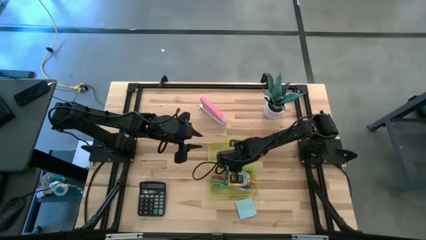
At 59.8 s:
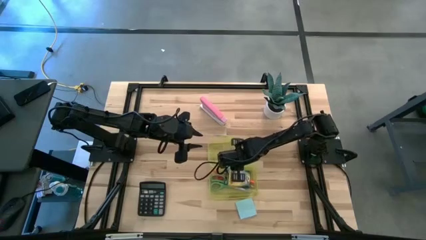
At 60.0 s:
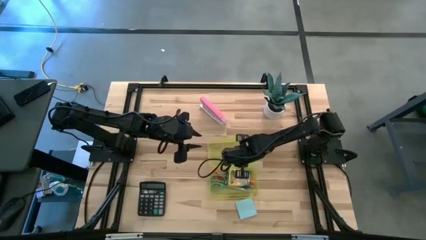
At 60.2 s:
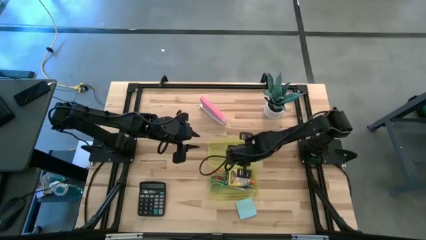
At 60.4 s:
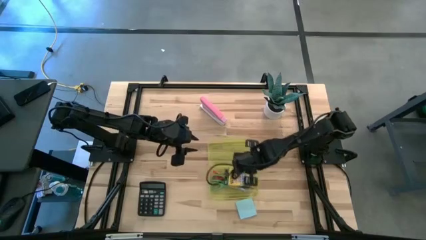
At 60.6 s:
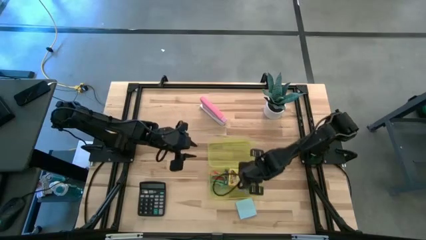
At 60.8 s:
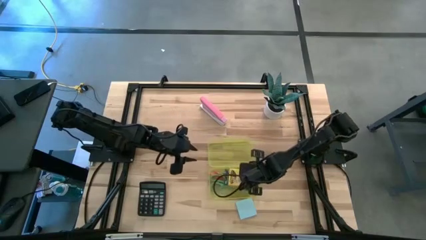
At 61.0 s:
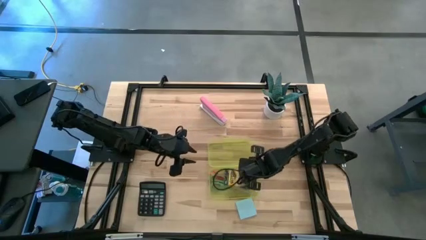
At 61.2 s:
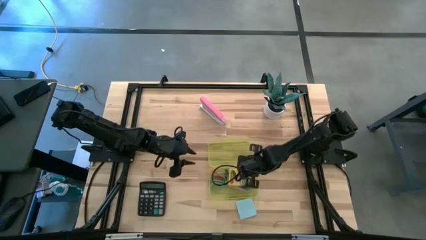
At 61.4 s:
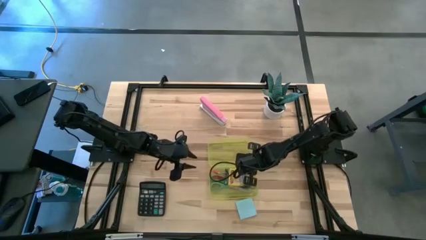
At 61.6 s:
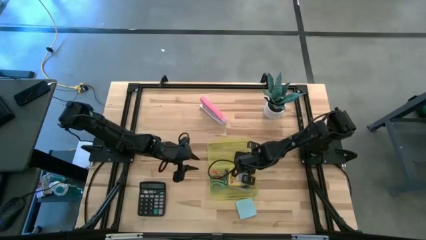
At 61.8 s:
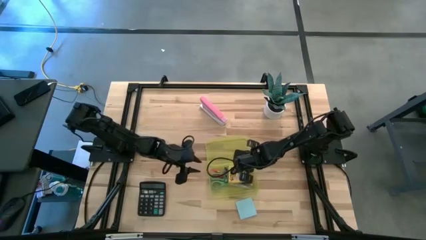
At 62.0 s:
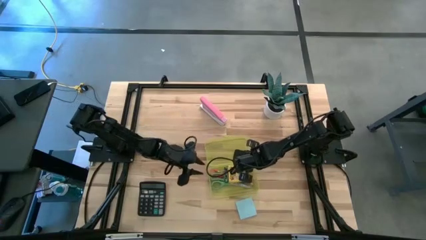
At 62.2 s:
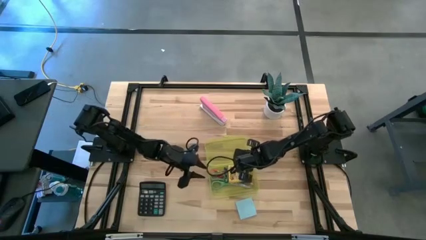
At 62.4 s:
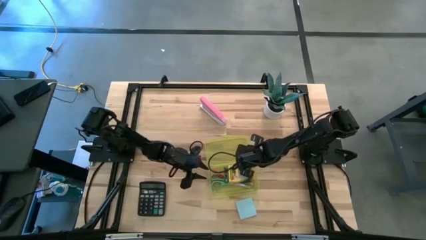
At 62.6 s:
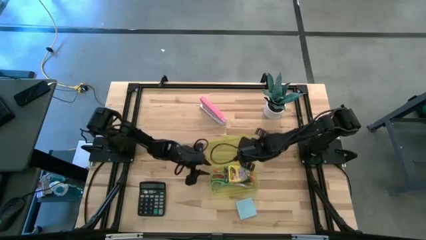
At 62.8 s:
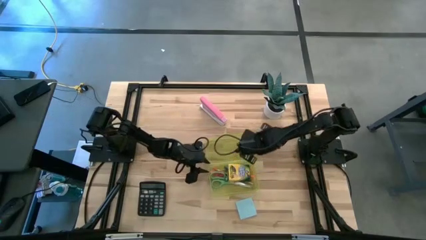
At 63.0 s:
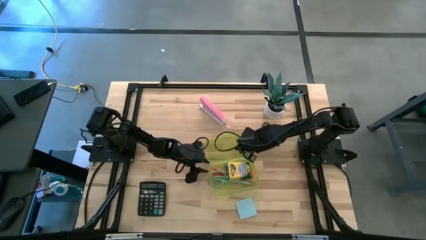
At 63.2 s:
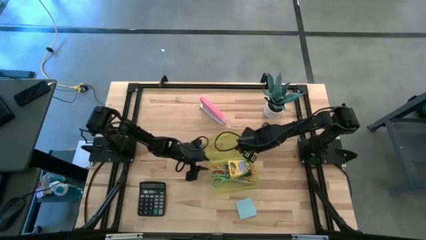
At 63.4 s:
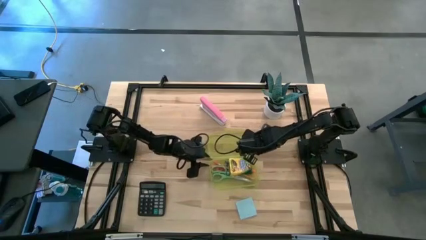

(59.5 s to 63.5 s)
Task: Pack school essentials
Adjust the yellow supply box

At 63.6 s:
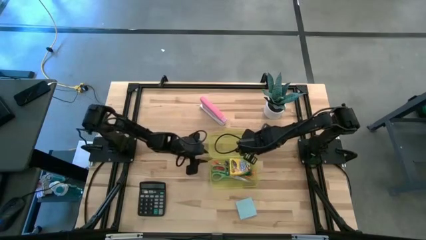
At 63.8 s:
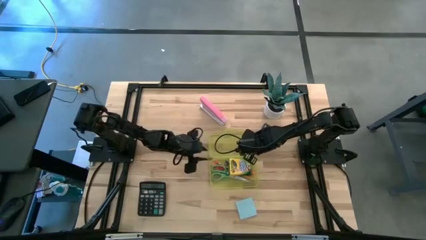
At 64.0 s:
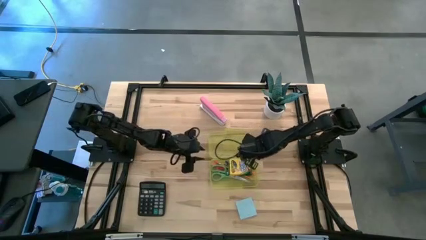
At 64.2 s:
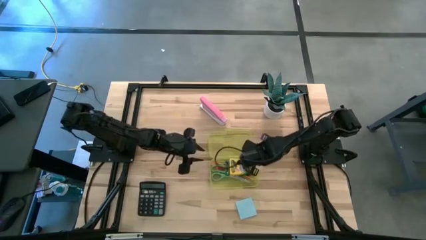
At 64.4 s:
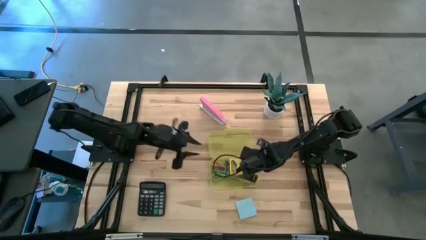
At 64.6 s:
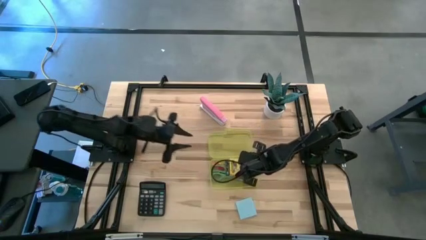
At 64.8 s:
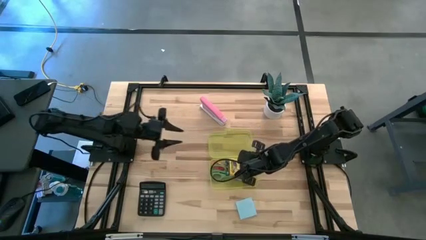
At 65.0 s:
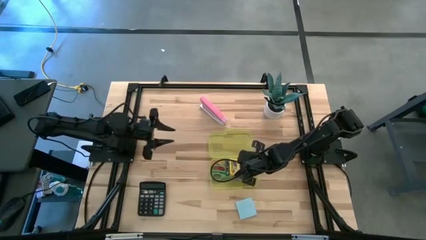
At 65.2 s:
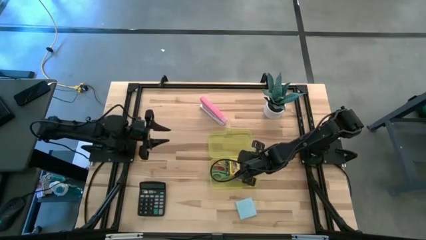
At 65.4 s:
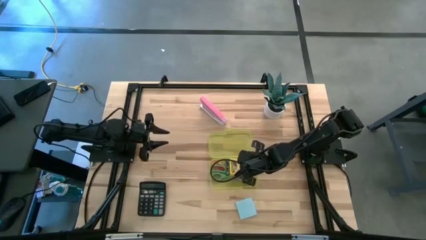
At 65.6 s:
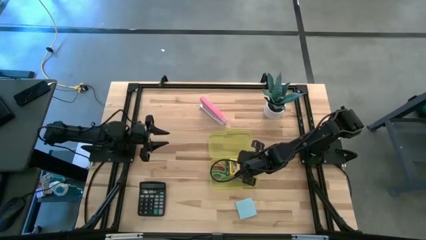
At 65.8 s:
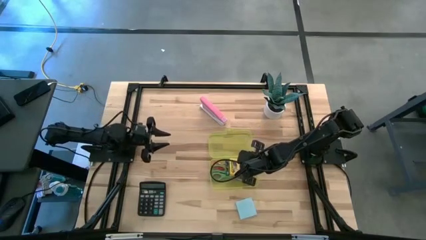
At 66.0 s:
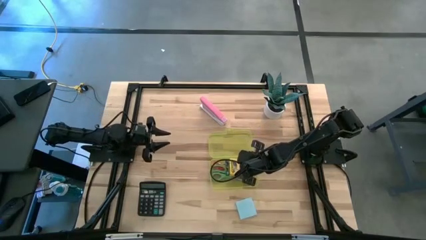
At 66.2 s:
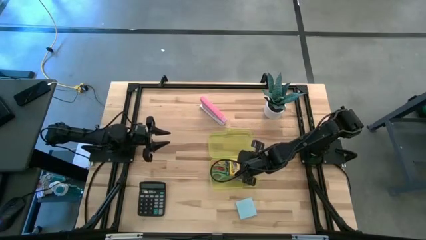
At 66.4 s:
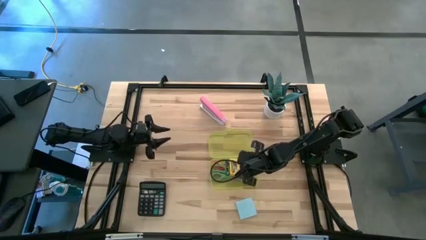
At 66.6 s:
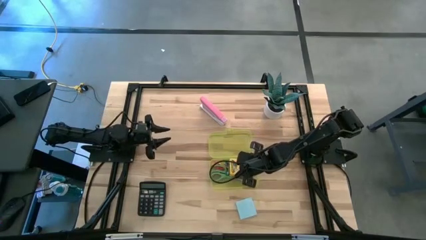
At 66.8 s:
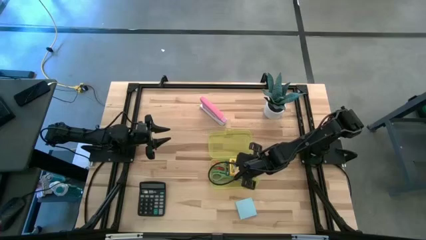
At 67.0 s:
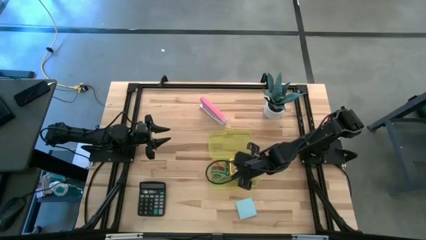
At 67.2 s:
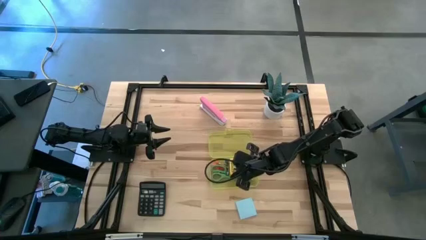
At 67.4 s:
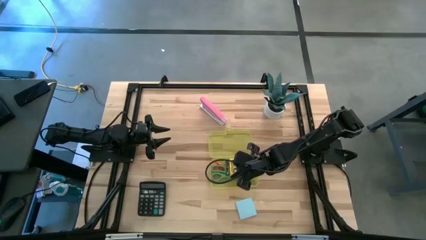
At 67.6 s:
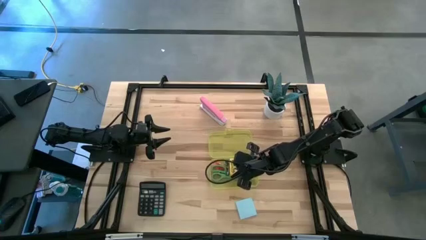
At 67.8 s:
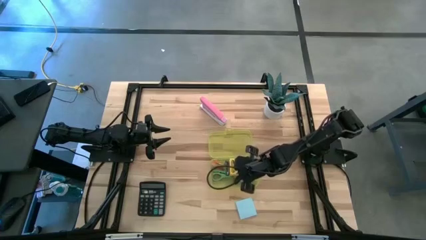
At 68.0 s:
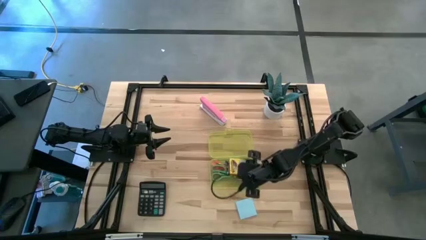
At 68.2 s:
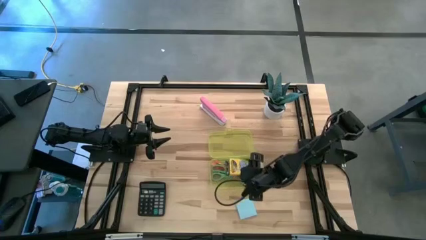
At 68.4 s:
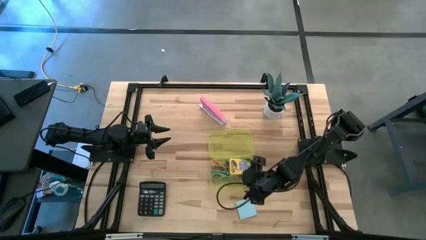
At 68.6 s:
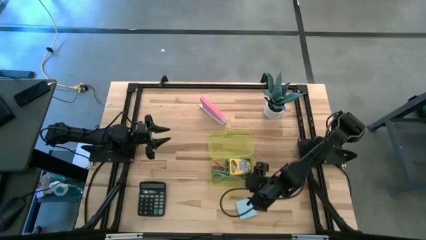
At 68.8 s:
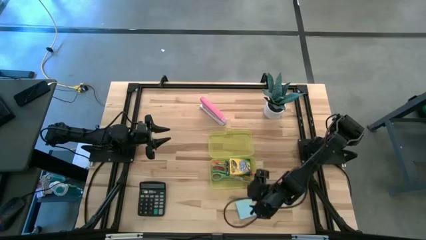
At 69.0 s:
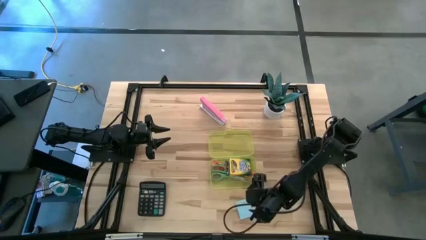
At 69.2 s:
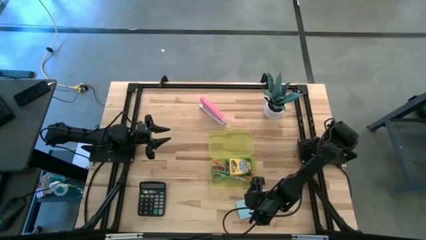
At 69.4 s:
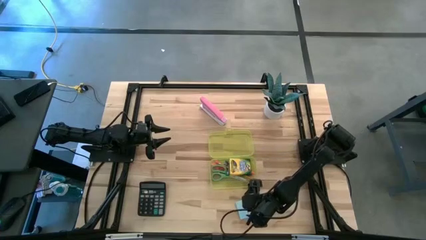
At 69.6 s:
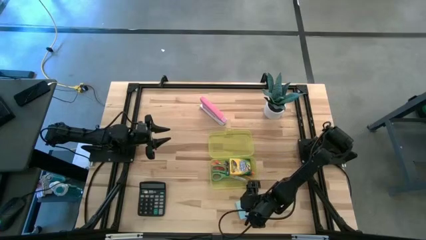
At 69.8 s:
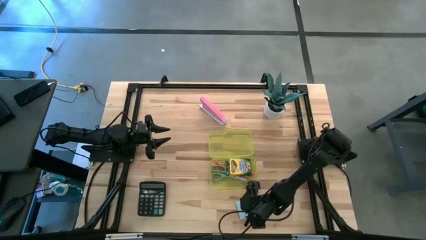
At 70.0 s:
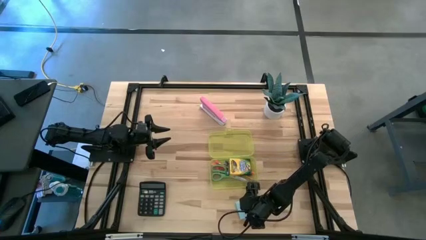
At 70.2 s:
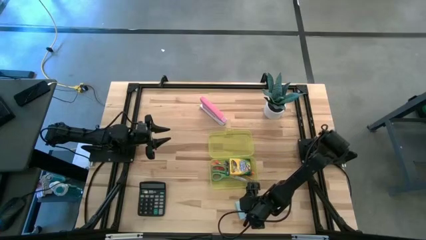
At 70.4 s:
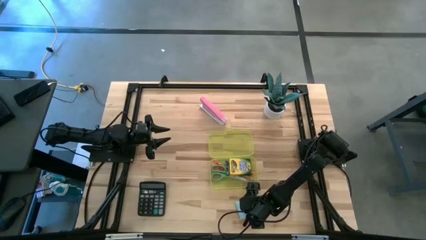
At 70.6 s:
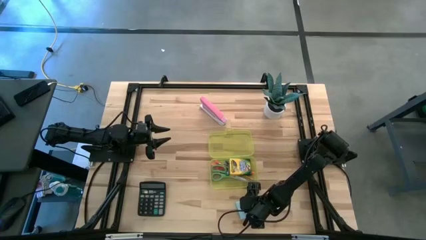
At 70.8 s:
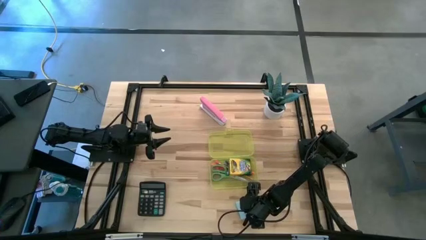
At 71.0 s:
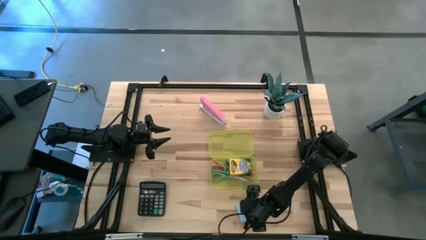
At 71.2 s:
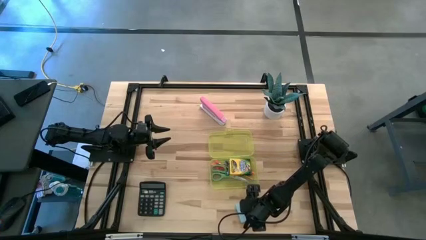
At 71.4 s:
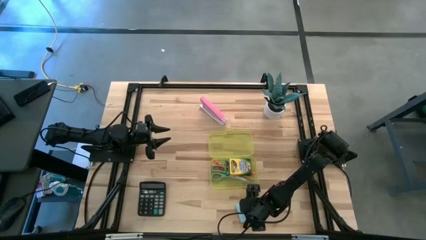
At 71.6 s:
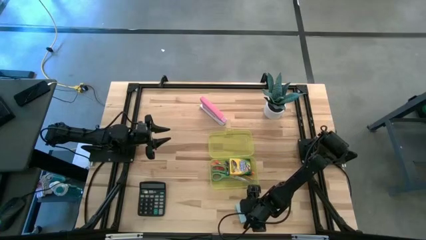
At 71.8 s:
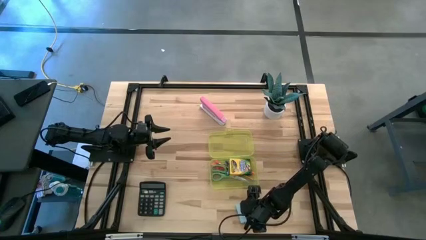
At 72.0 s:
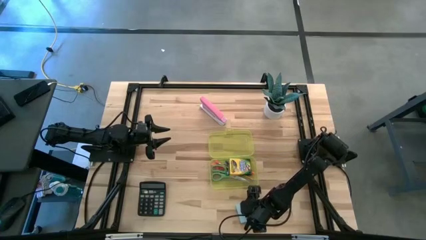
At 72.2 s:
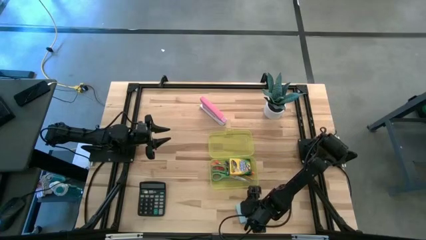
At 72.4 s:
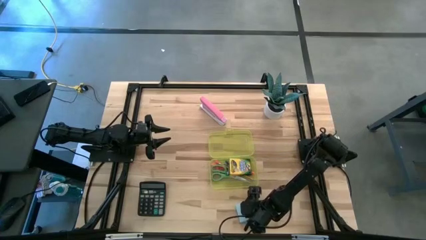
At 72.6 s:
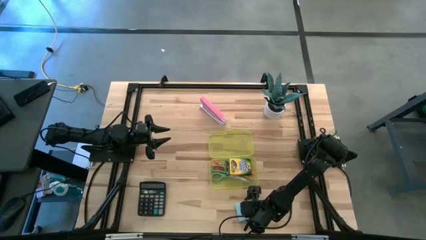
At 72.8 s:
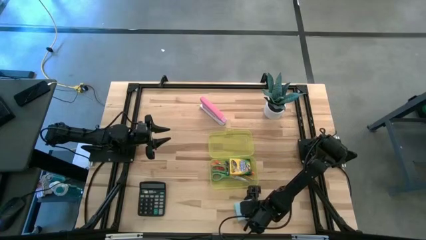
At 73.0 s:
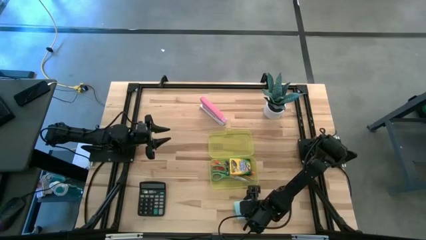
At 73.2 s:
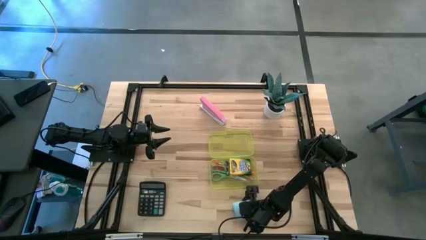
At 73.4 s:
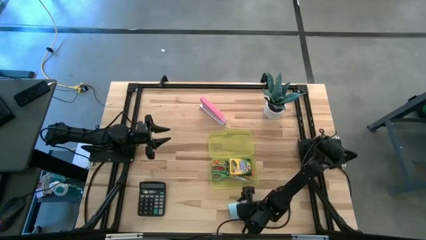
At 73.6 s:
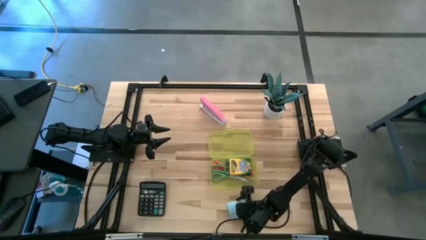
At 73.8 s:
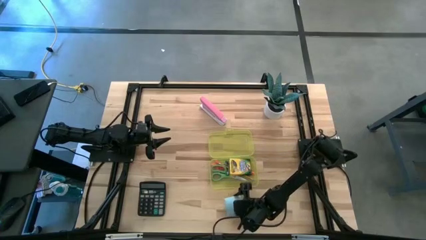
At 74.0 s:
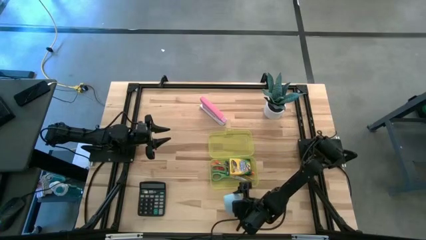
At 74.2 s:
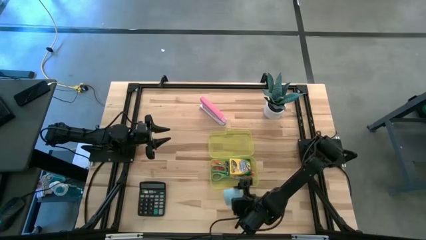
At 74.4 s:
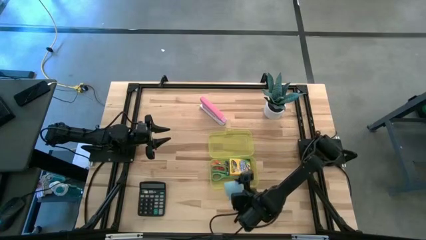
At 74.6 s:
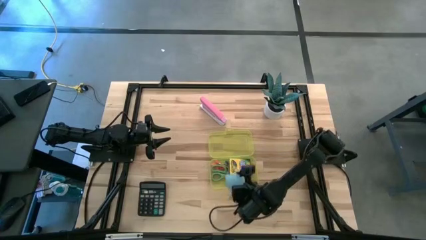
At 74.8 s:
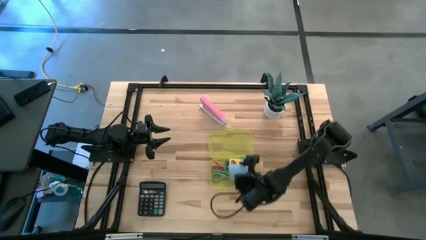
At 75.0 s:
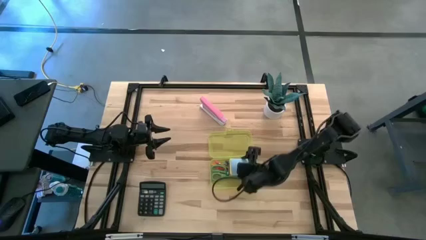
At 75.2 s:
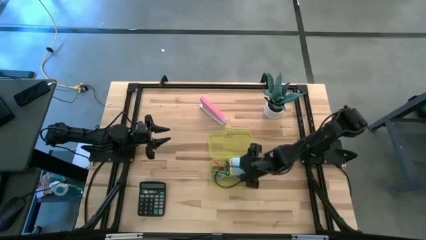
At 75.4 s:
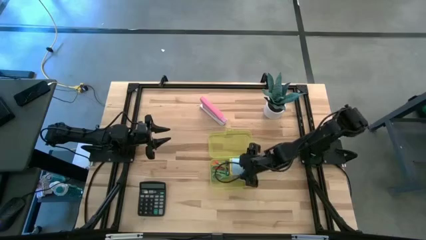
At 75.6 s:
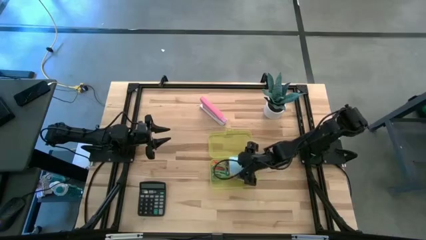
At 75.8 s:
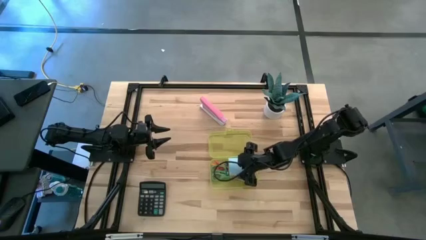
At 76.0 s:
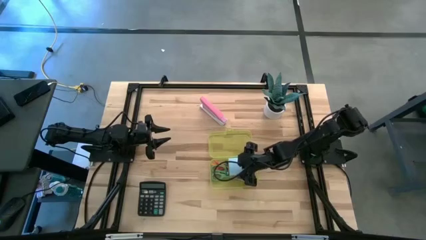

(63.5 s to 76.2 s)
Put the sticky note into the yellow supply box
